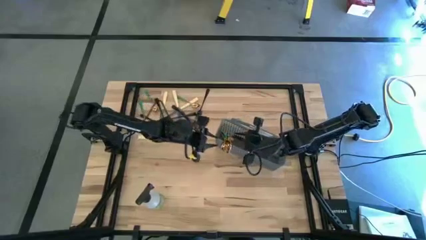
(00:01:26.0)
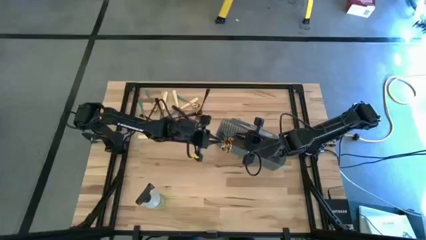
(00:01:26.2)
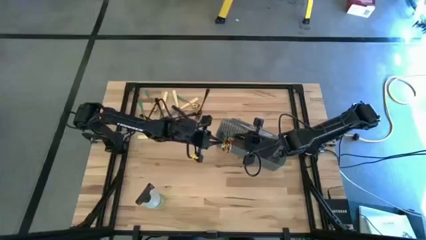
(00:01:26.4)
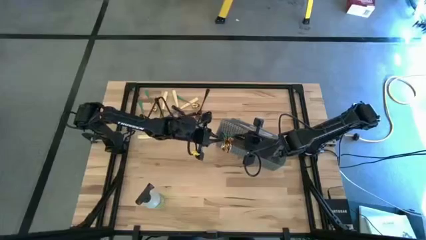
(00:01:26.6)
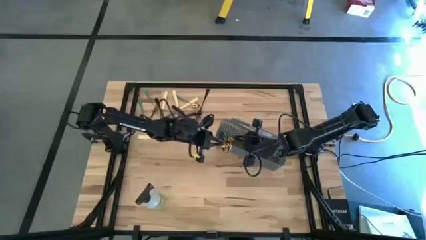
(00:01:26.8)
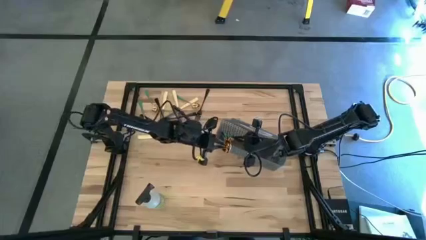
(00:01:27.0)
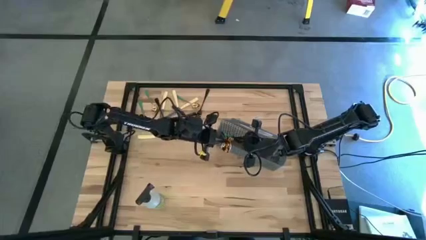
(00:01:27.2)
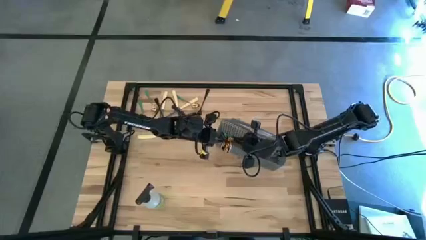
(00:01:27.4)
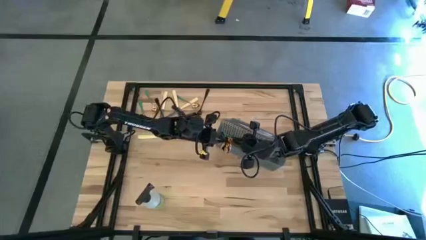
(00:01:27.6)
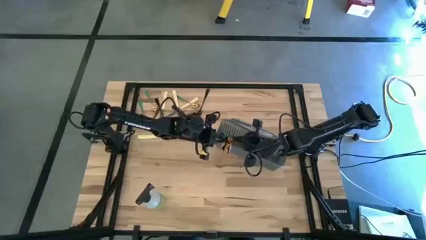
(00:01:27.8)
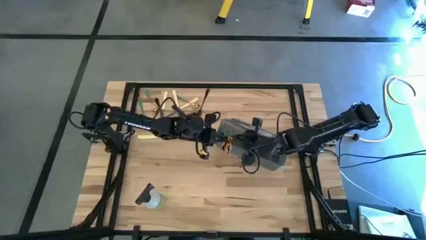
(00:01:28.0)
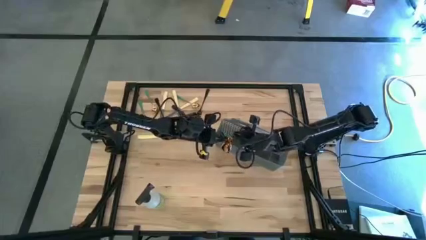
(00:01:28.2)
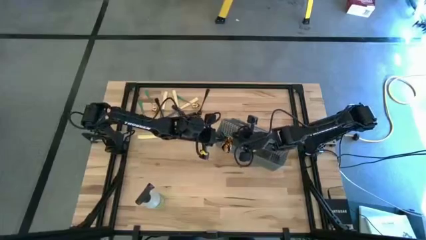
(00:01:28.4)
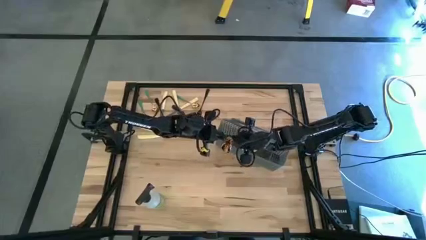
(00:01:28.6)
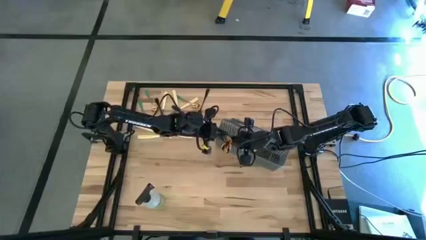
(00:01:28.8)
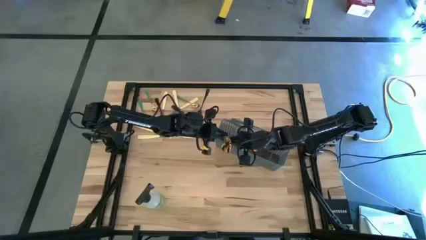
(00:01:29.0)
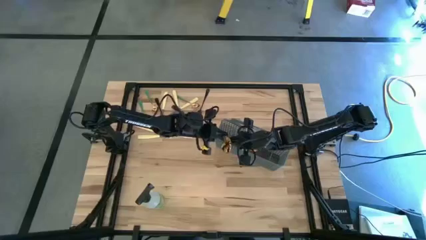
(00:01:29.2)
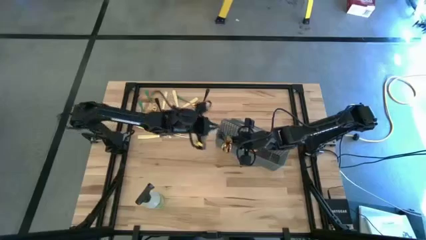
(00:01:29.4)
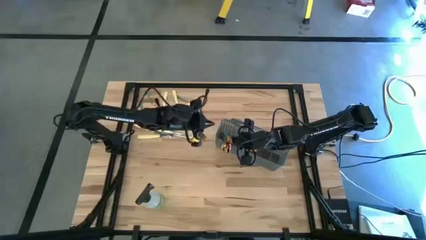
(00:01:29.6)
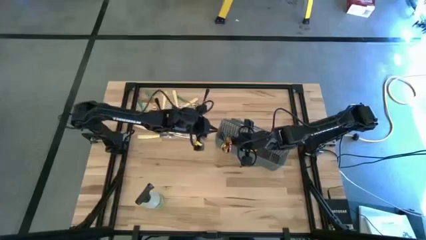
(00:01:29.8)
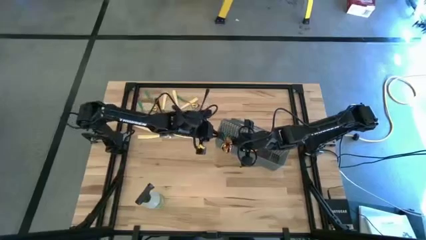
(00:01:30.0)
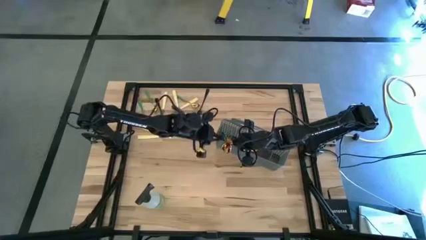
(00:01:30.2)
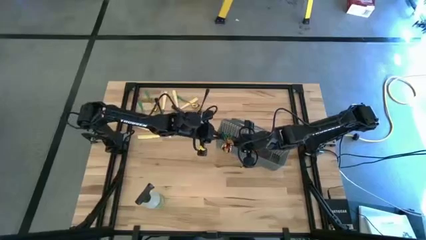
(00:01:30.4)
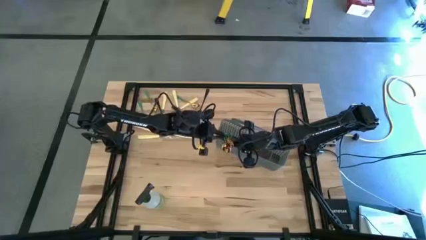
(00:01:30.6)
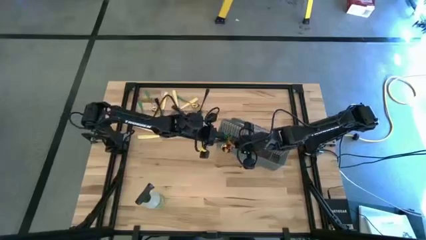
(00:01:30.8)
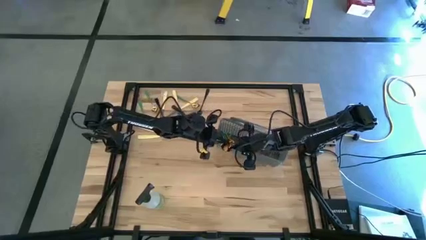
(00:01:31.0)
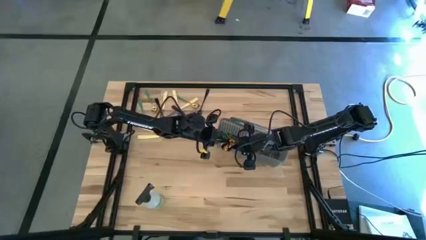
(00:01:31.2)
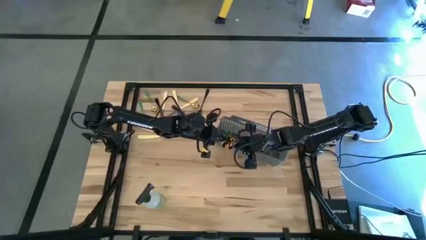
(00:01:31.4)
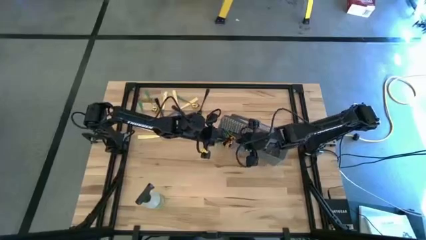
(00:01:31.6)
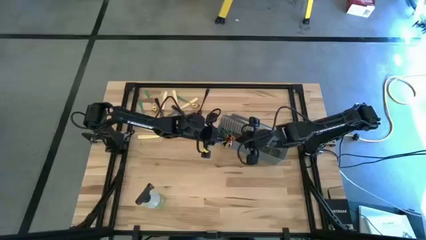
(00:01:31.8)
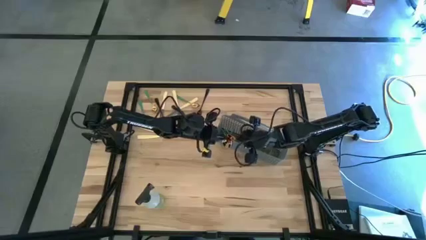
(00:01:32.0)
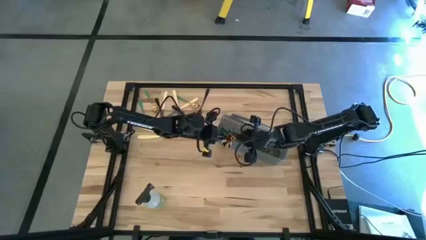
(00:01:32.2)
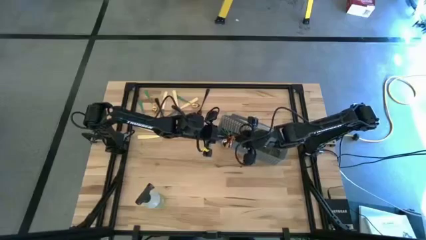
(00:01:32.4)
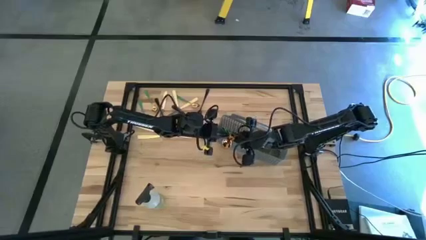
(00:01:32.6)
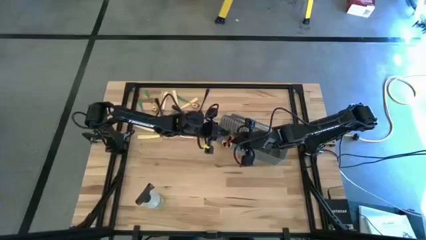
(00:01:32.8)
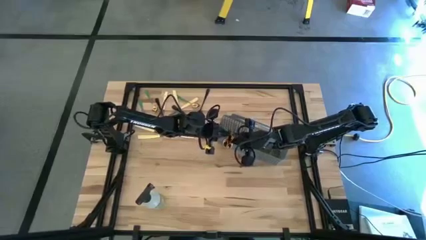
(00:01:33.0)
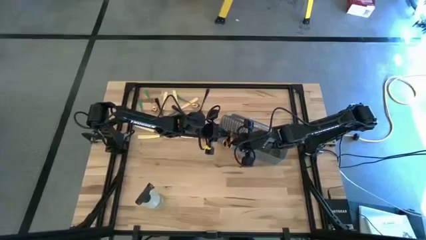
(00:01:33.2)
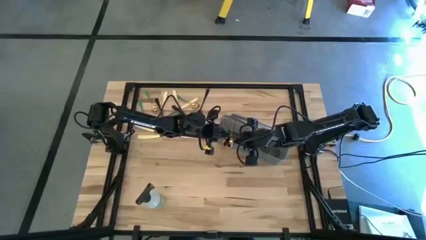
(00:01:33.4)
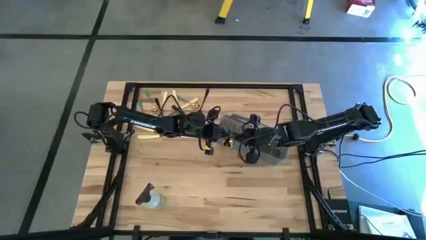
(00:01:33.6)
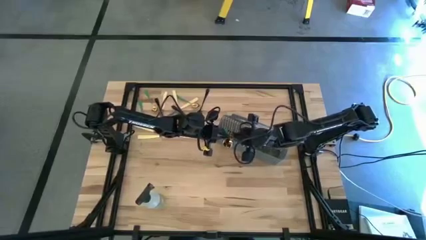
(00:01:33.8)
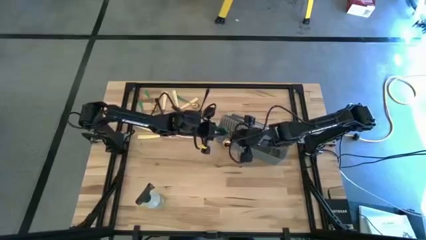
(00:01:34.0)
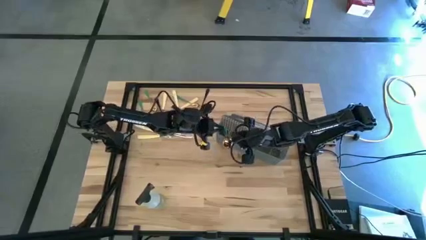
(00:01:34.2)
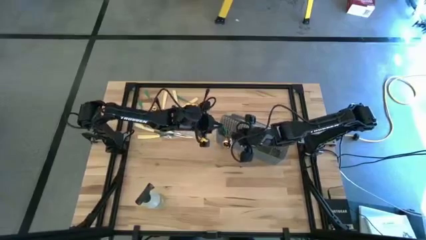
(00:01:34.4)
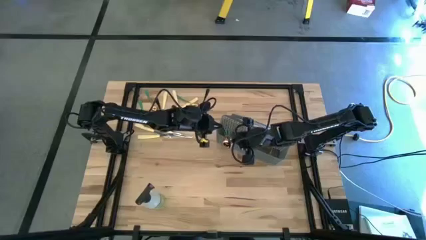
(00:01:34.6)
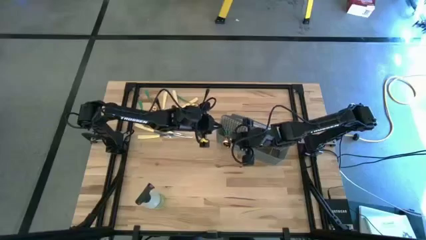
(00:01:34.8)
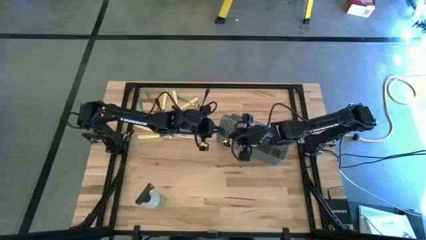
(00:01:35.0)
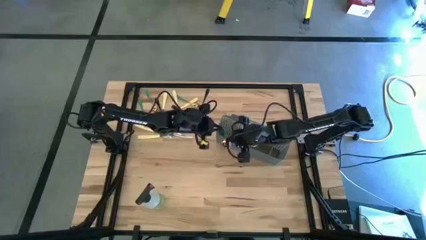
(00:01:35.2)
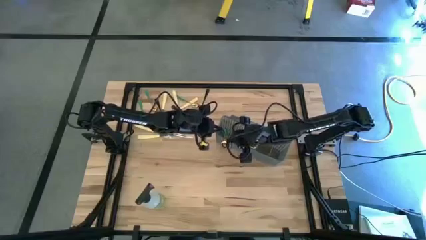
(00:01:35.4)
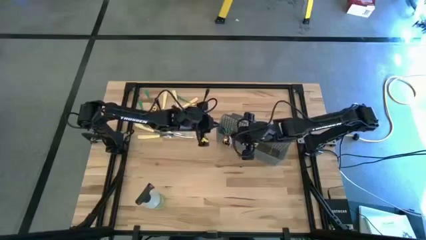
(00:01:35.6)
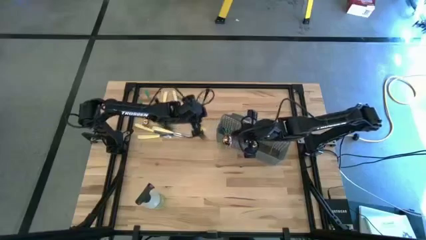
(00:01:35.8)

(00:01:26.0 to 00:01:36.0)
Task: Sort silverware
Put the gold spoon into the cutlery rack

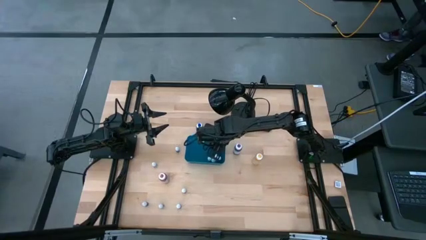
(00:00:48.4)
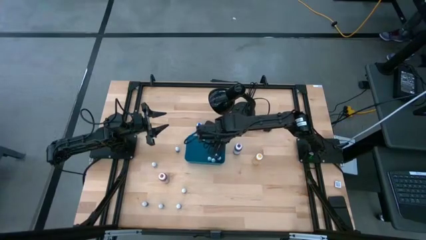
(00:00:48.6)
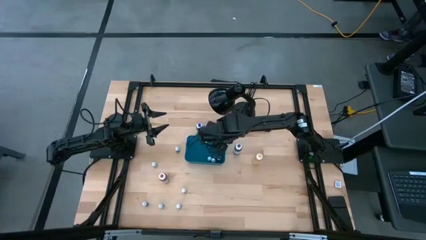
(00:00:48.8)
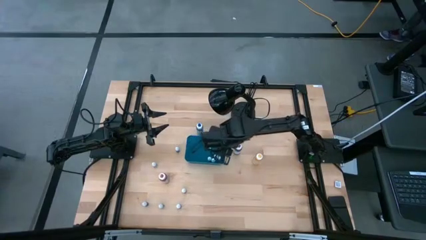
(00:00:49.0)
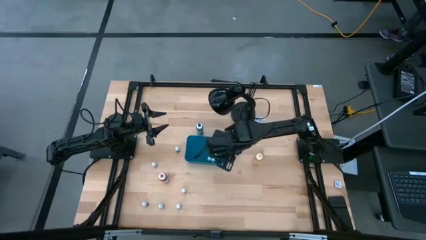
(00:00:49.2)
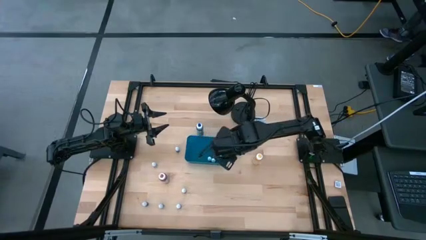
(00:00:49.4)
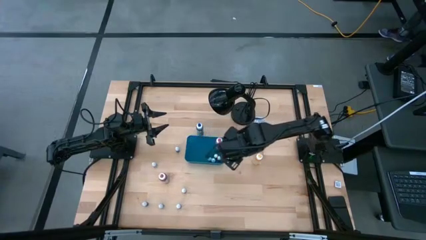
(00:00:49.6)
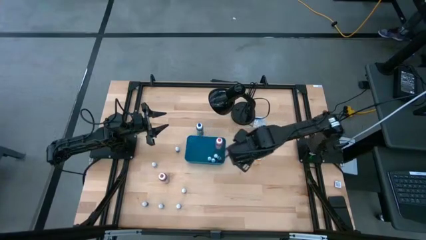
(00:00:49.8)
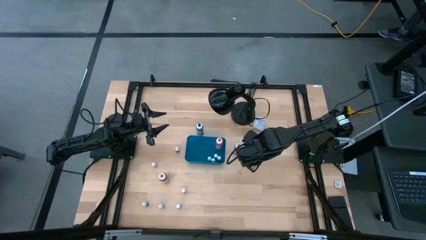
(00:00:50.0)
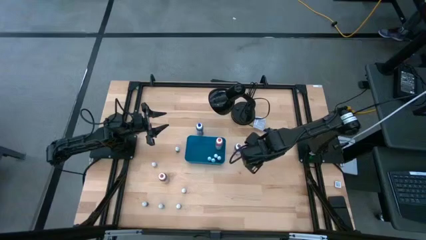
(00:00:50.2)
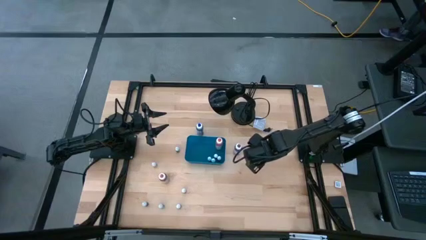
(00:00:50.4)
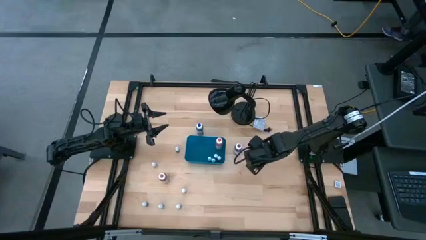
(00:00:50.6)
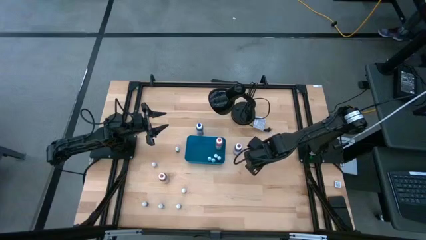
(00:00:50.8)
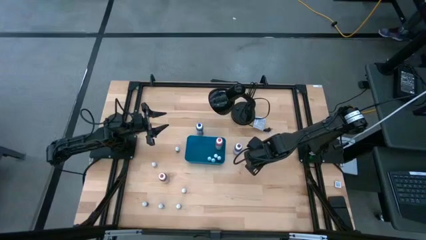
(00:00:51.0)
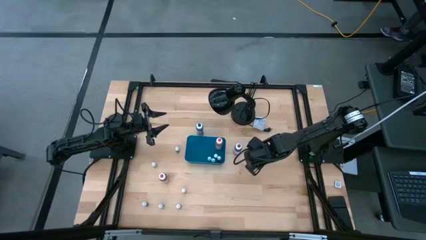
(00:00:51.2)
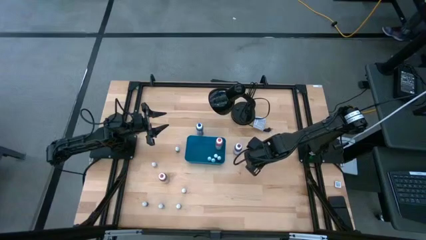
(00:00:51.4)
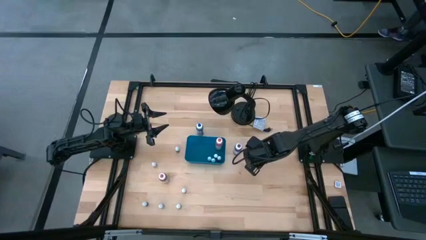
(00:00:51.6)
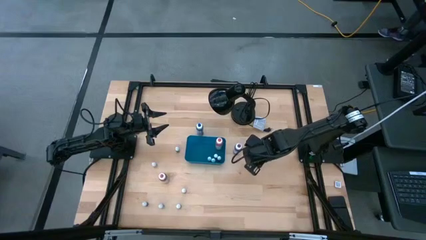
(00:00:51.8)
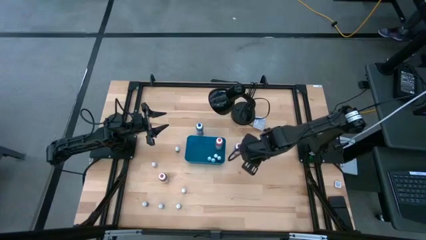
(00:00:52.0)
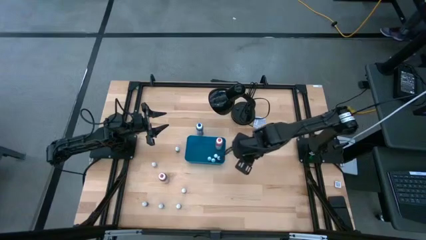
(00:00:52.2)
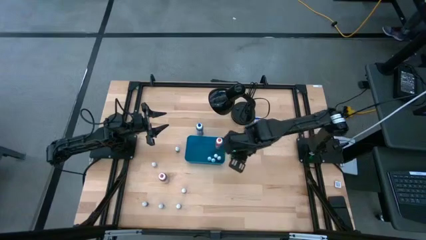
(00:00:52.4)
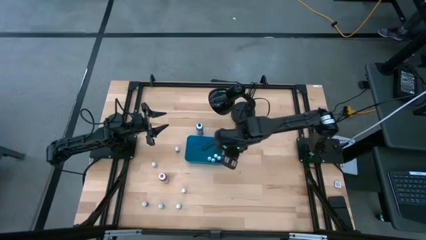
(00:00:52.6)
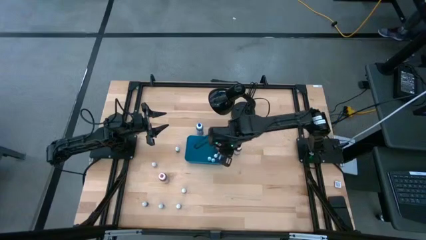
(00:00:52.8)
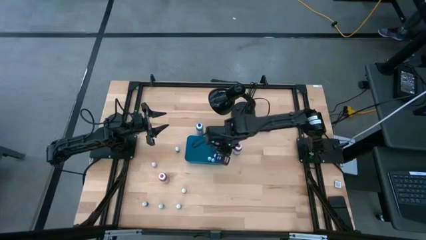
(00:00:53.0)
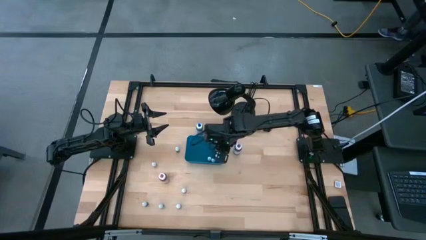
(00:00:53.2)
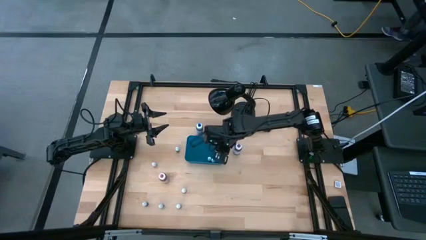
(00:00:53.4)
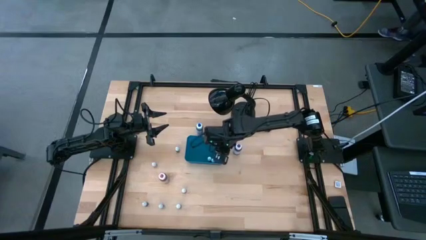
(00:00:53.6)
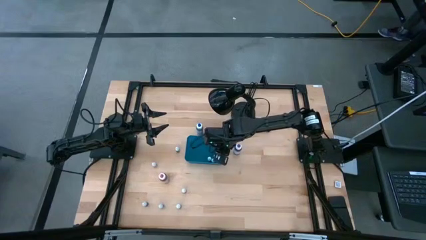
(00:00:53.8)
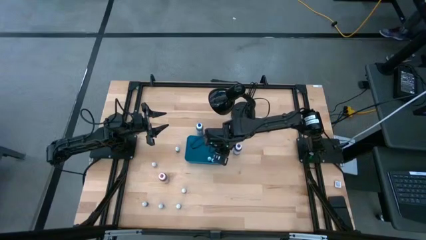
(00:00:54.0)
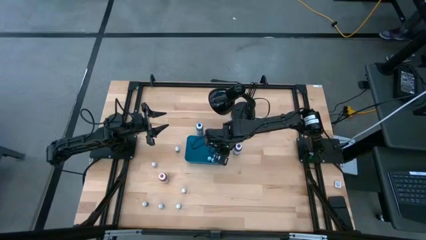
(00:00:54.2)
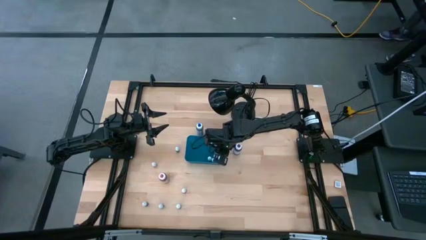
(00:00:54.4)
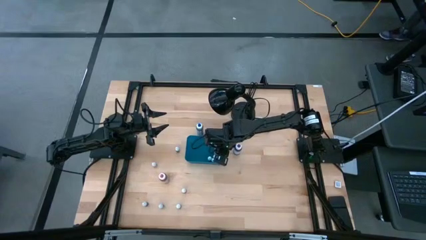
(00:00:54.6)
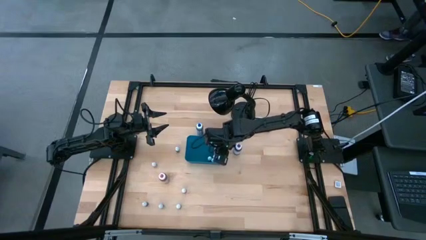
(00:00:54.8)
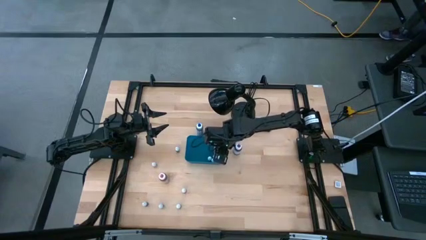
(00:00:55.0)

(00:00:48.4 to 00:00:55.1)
Task: Pick & Place food coloring
Put the large yellow food coloring bottle into the blue bin
